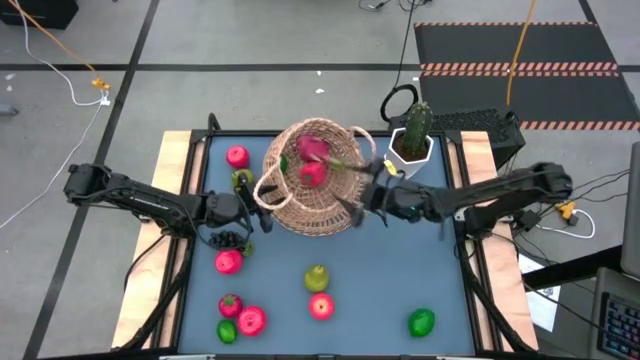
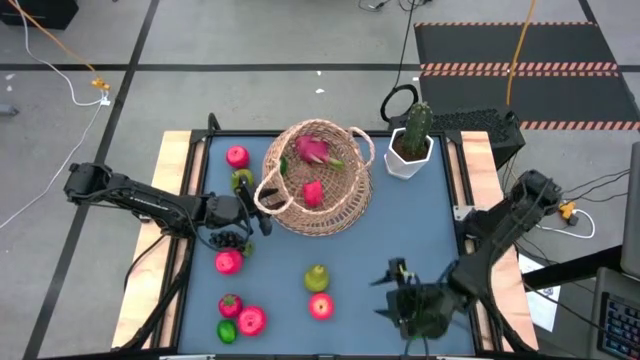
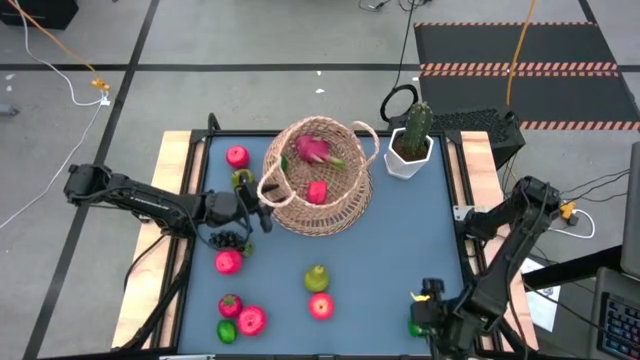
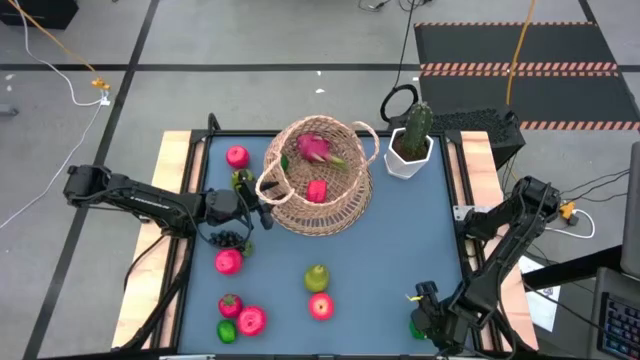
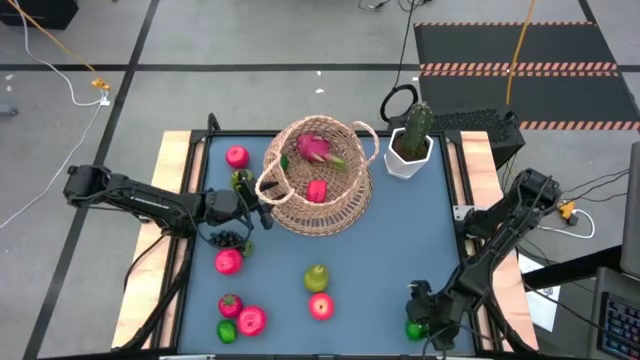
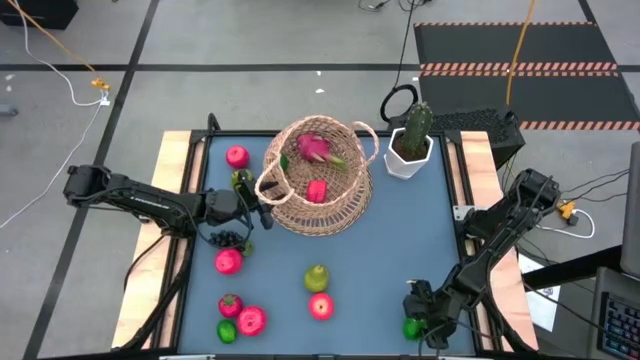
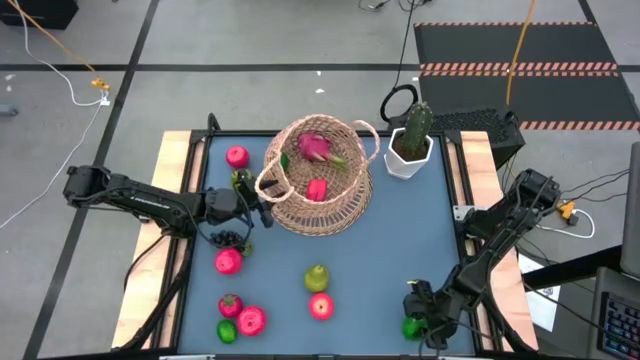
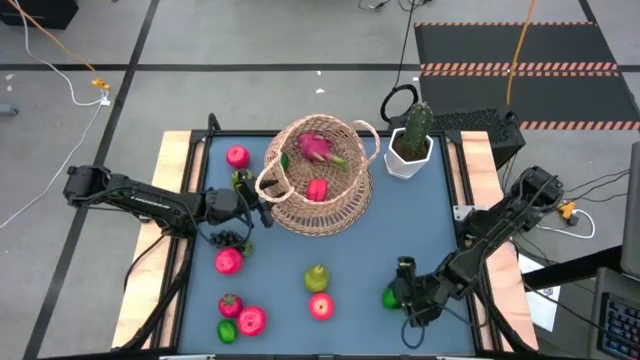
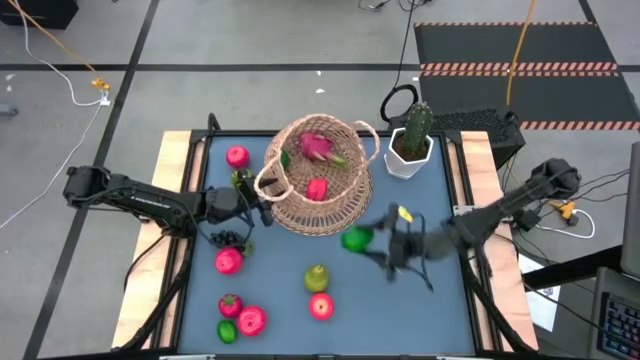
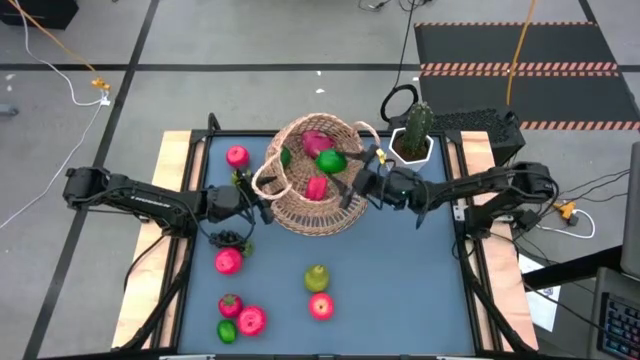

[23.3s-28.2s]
Task: Build produce basket
Put the lime into the brown basket

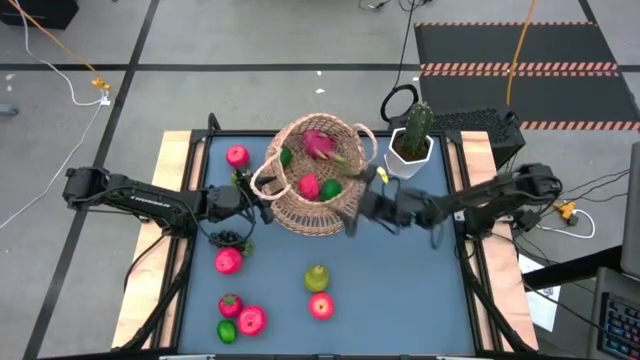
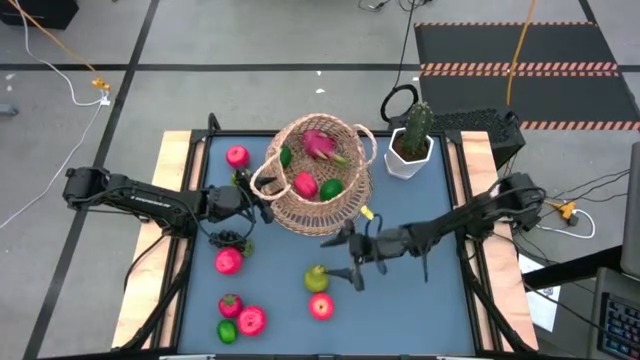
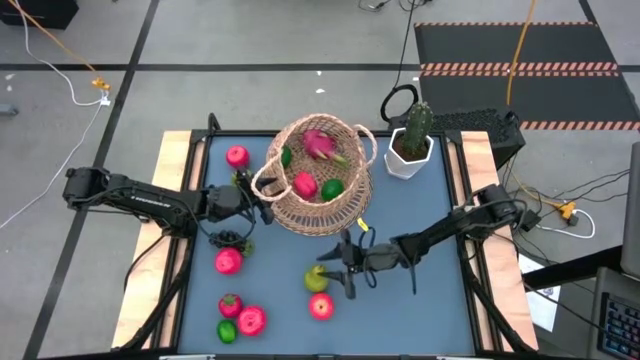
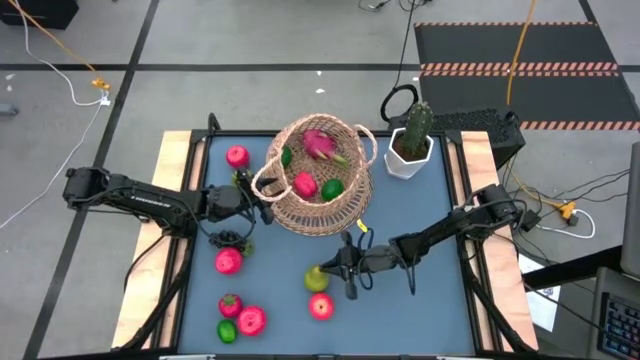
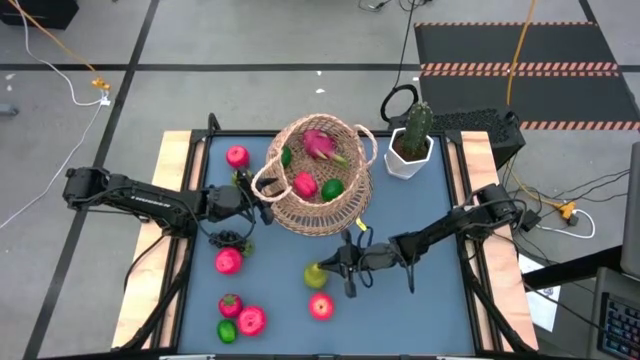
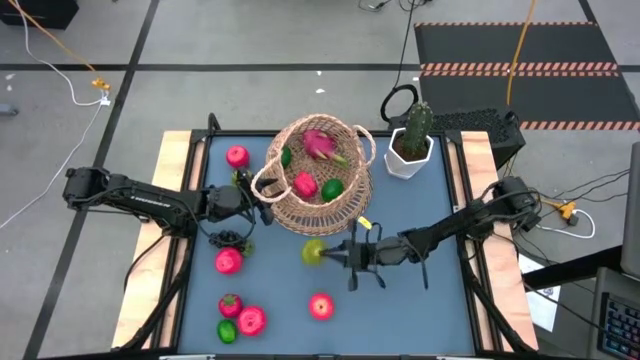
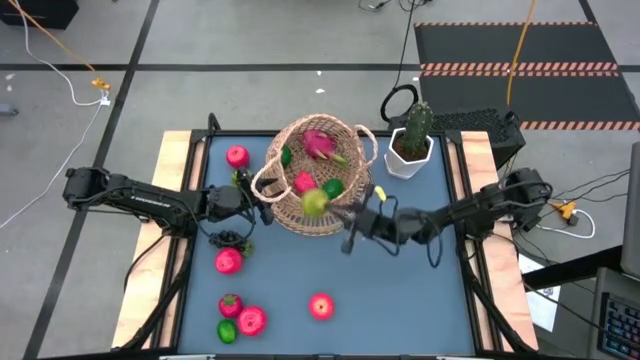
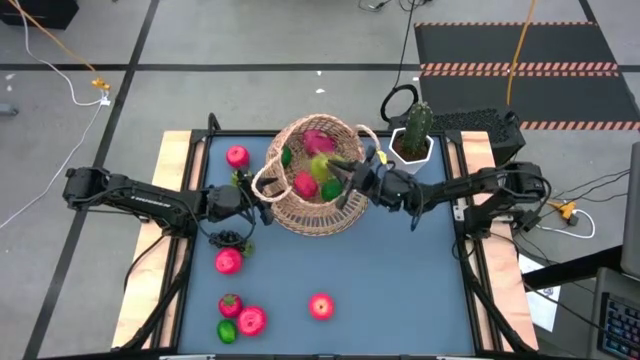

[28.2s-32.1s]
Put the pear into the brown basket

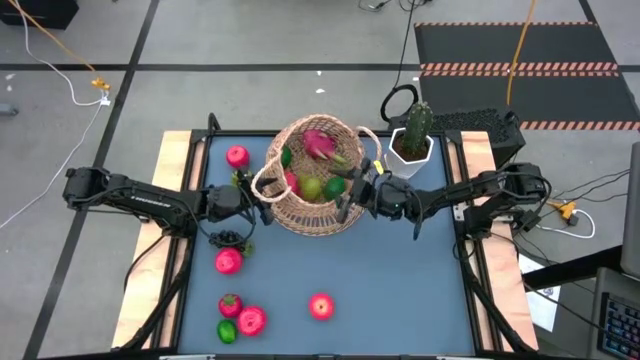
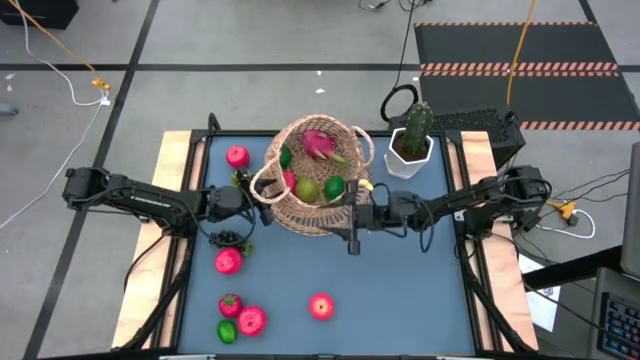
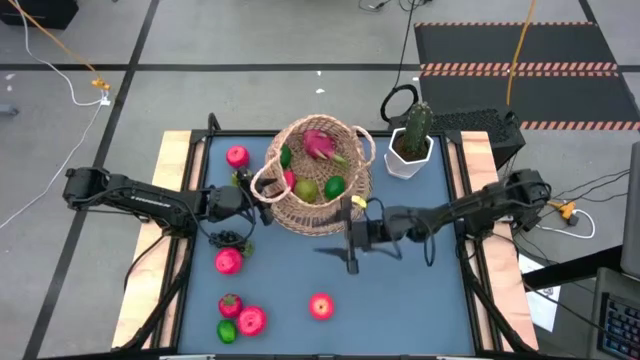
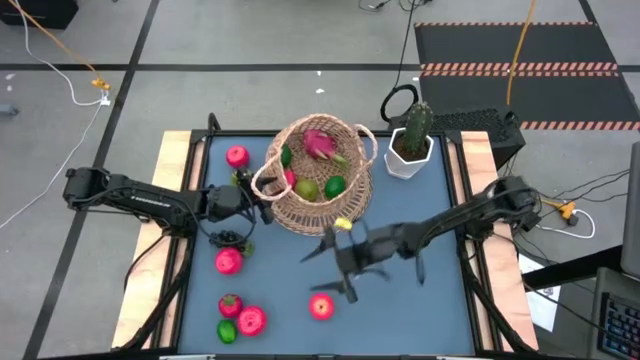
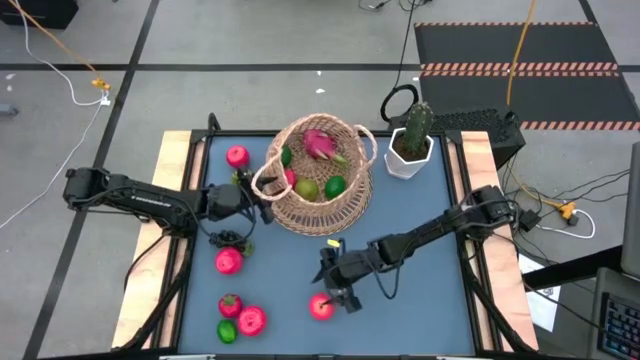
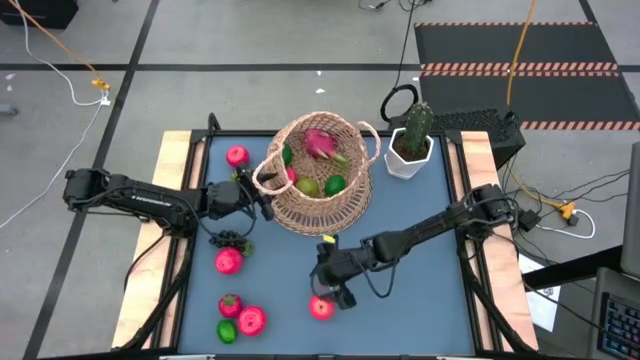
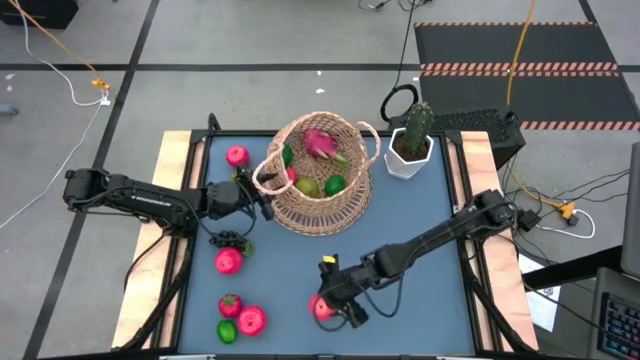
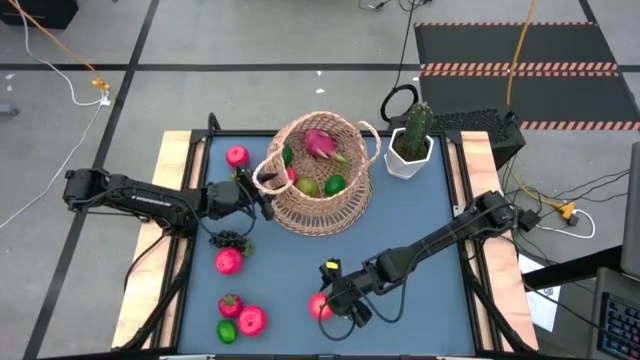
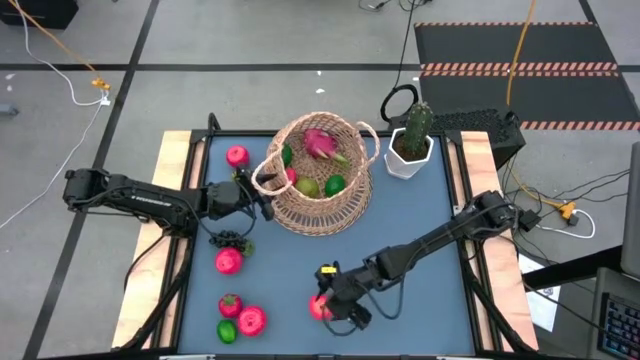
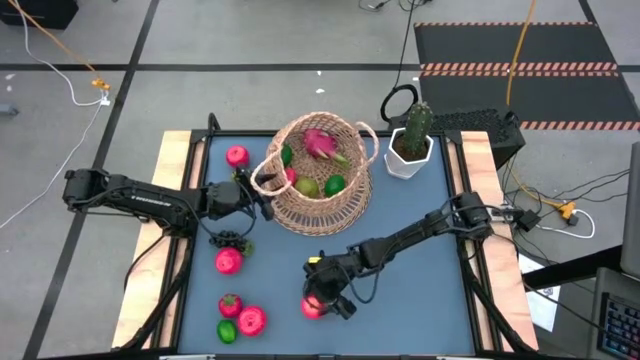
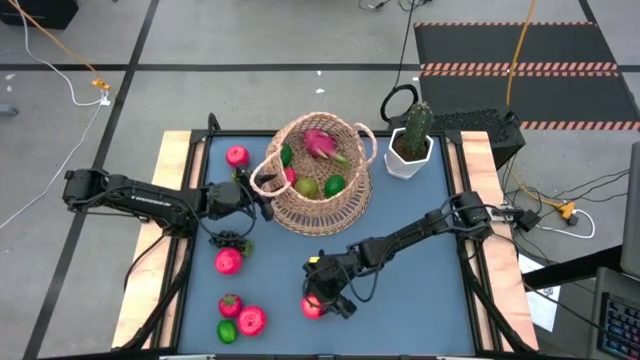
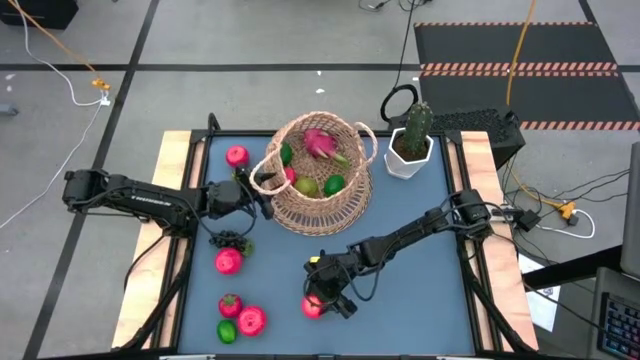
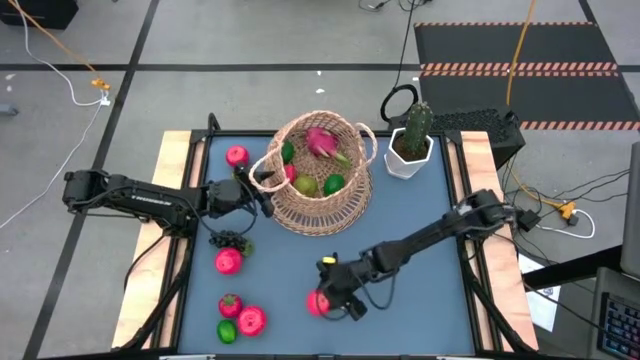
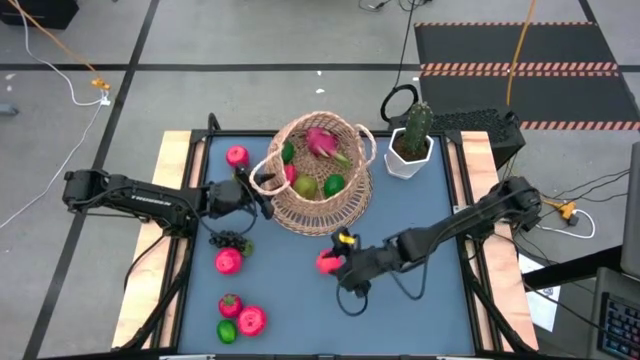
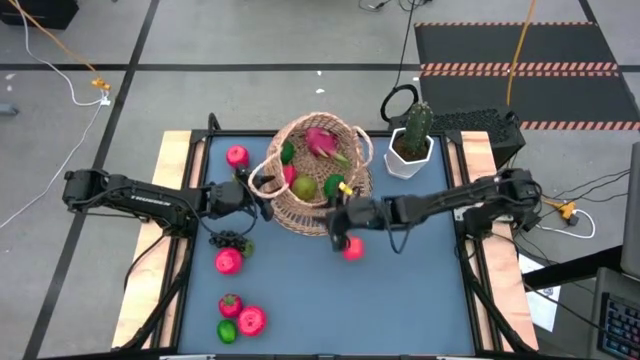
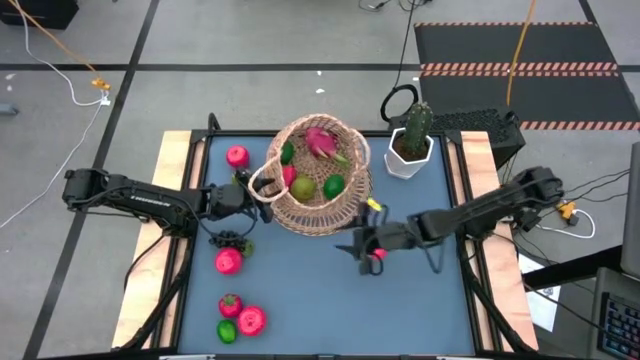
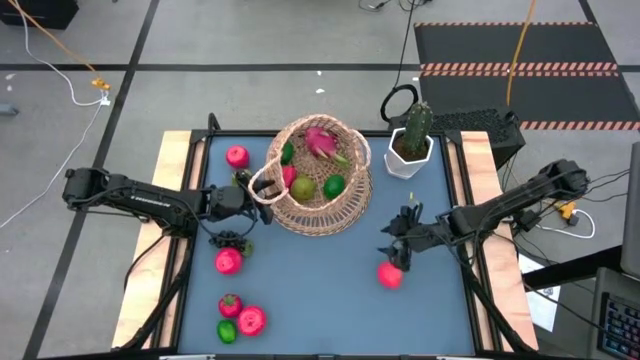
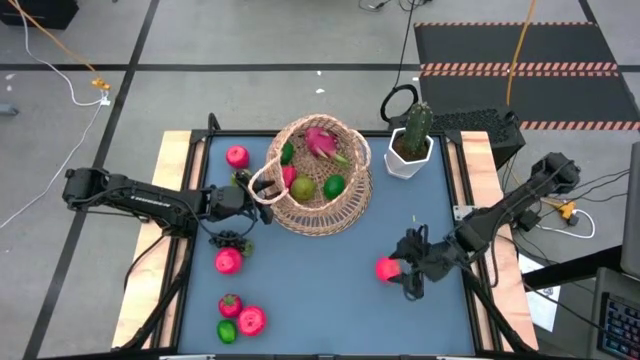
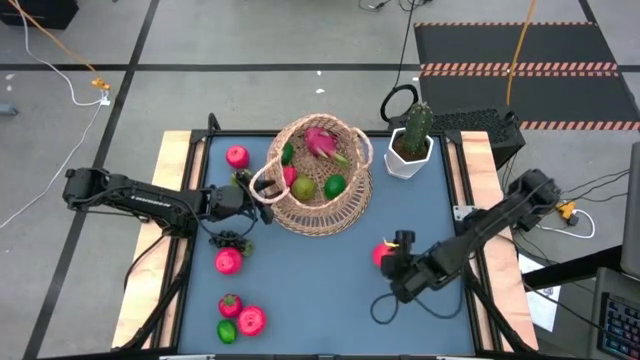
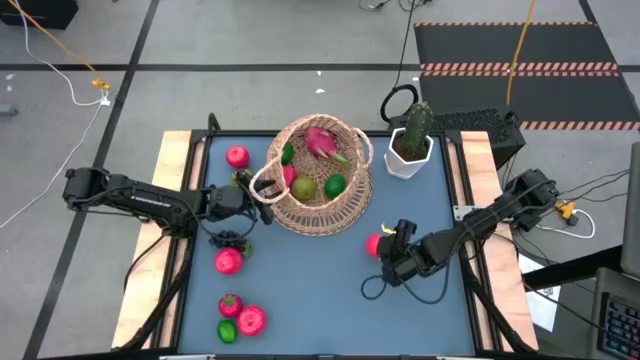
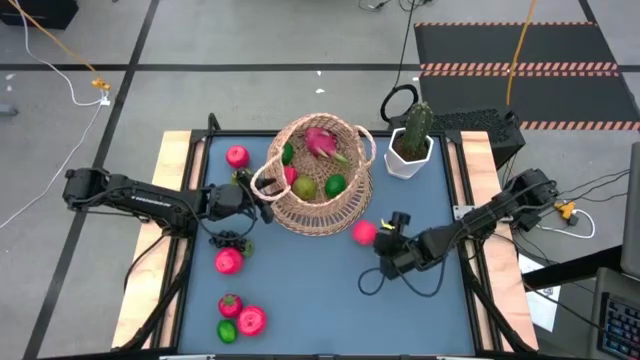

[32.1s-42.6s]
Put the apple into the brown basket

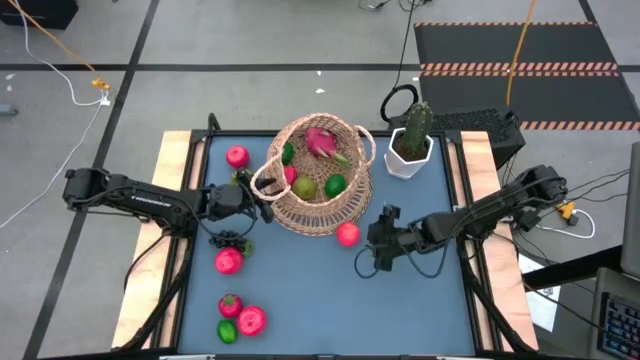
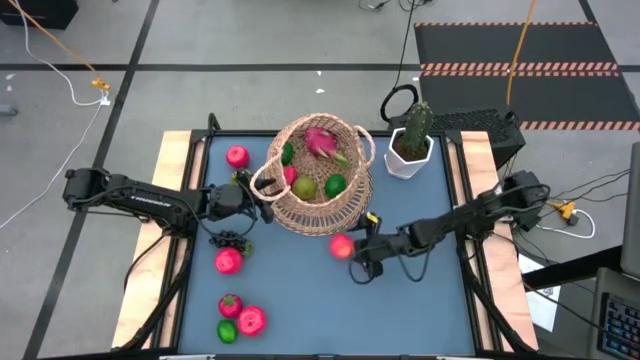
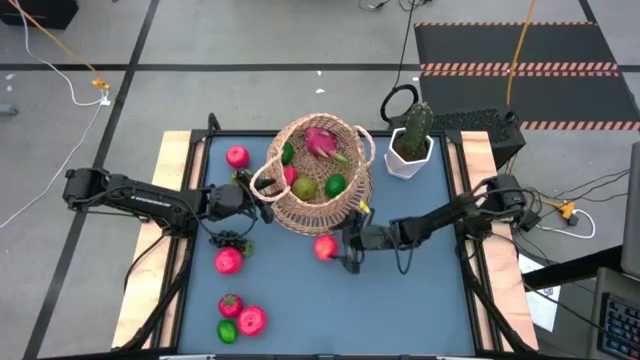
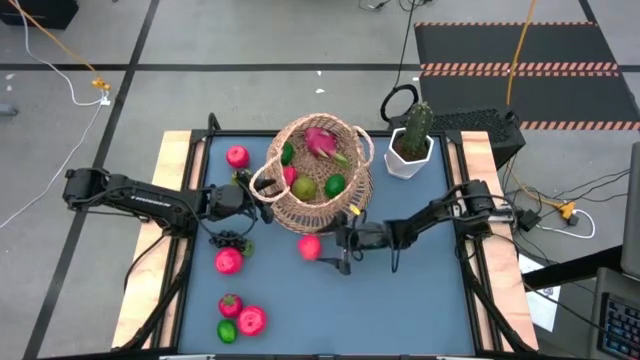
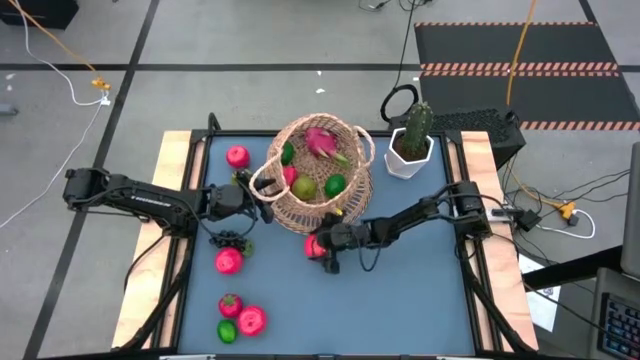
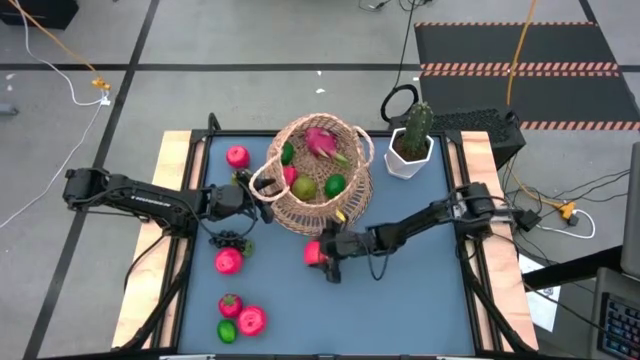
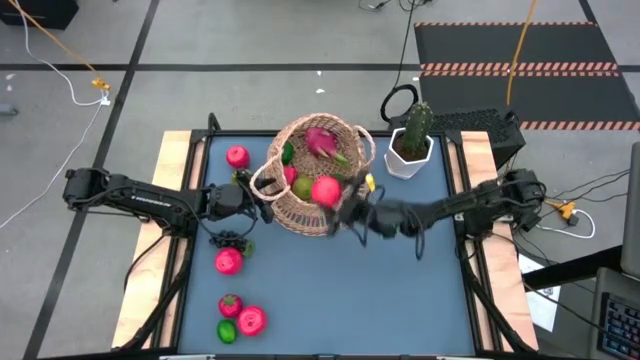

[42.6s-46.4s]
Put the apple into the brown basket
